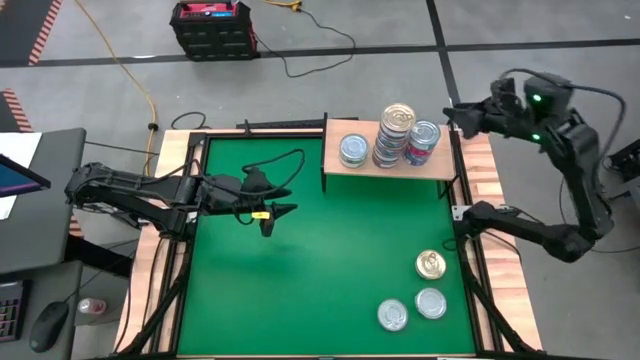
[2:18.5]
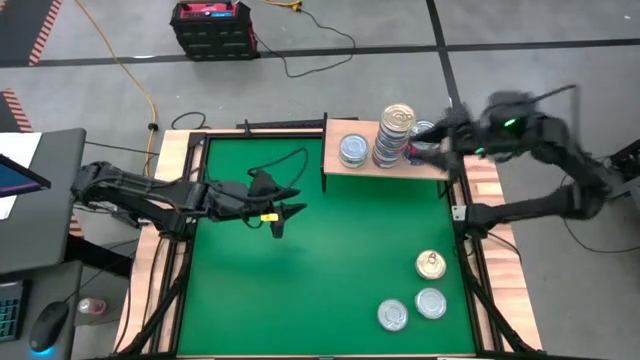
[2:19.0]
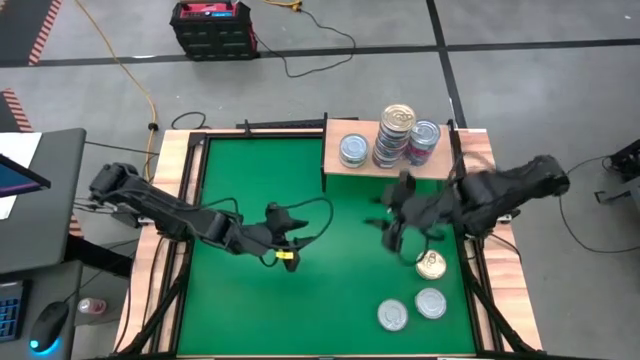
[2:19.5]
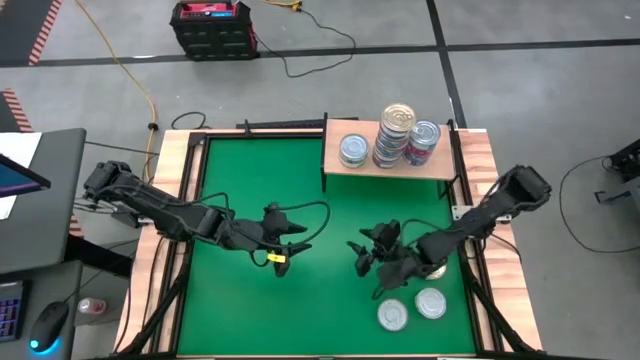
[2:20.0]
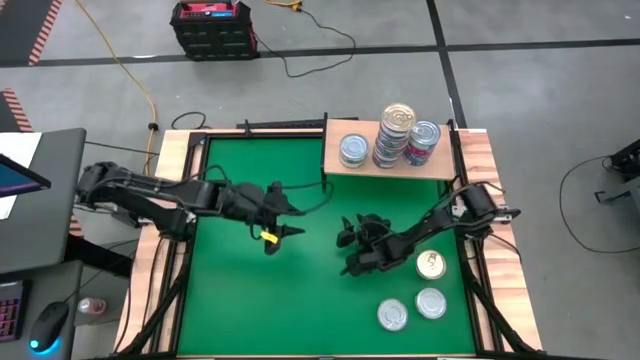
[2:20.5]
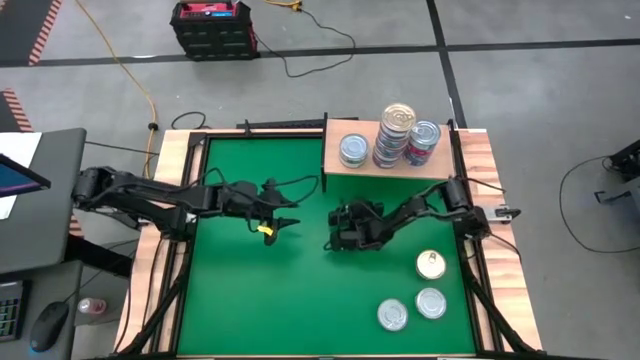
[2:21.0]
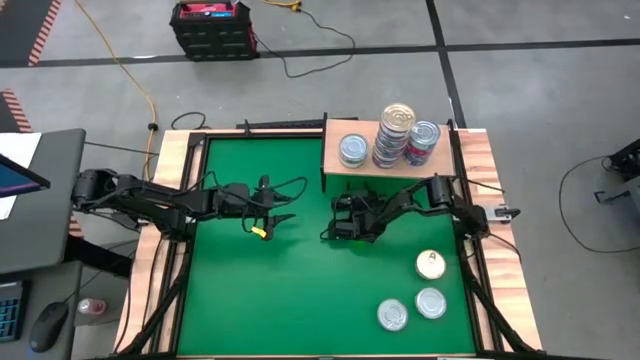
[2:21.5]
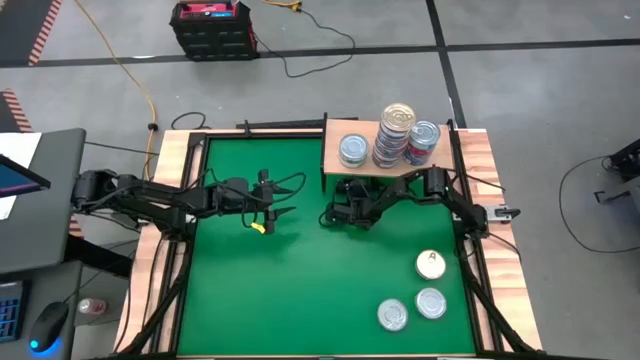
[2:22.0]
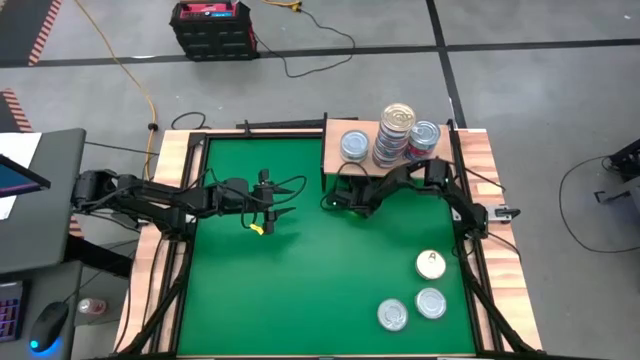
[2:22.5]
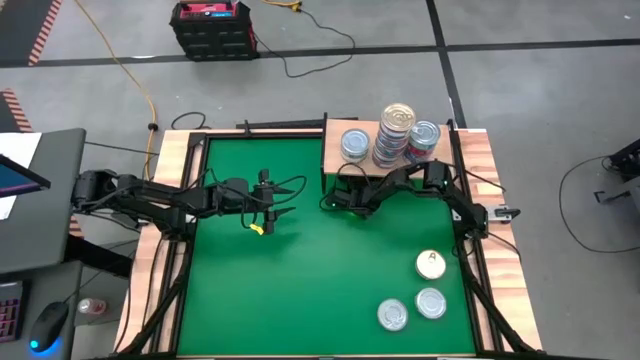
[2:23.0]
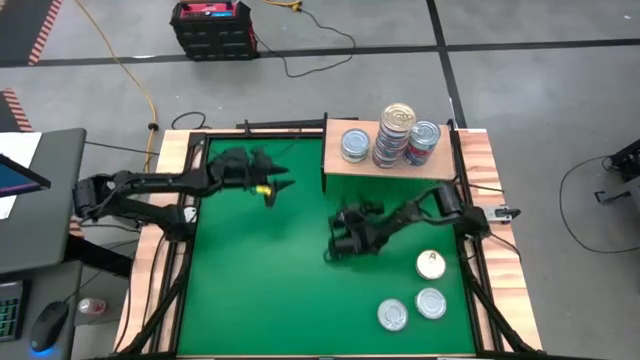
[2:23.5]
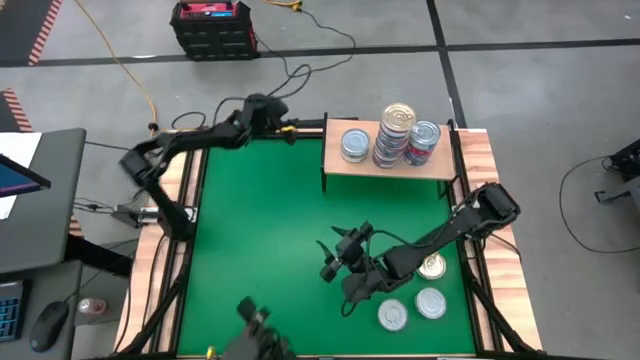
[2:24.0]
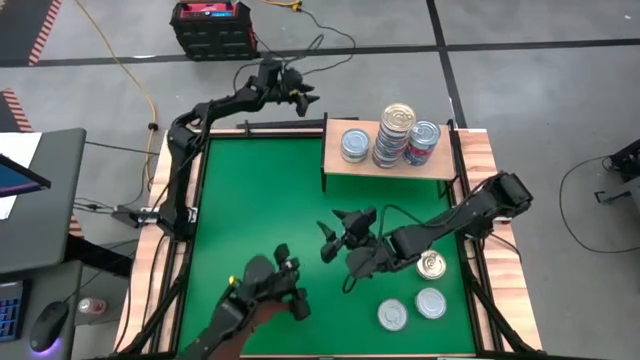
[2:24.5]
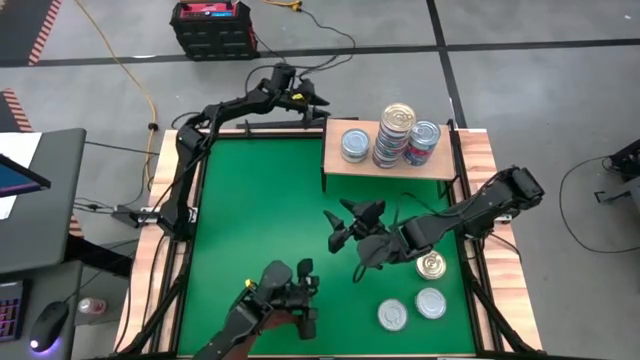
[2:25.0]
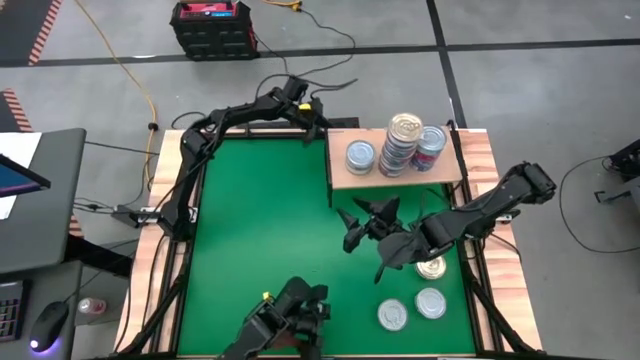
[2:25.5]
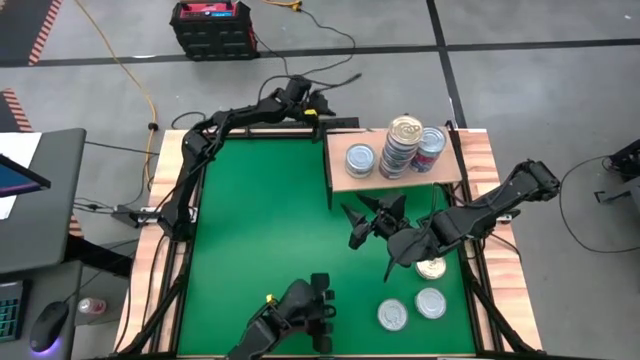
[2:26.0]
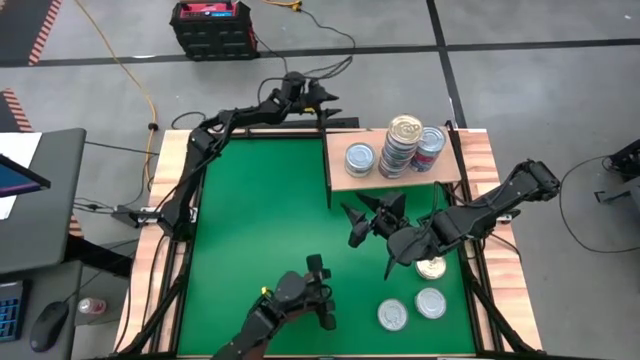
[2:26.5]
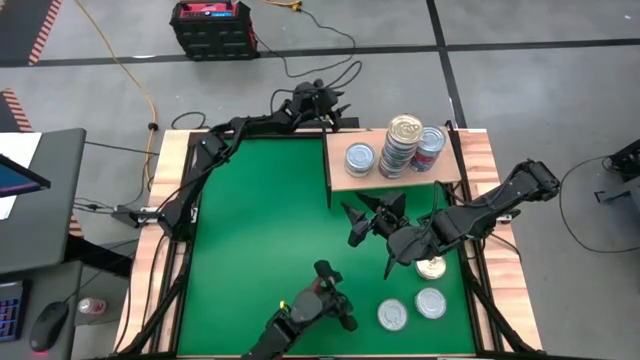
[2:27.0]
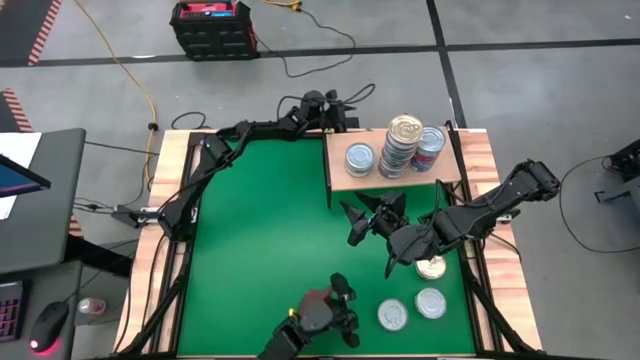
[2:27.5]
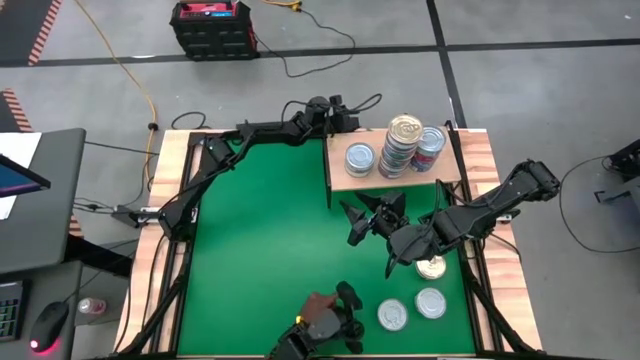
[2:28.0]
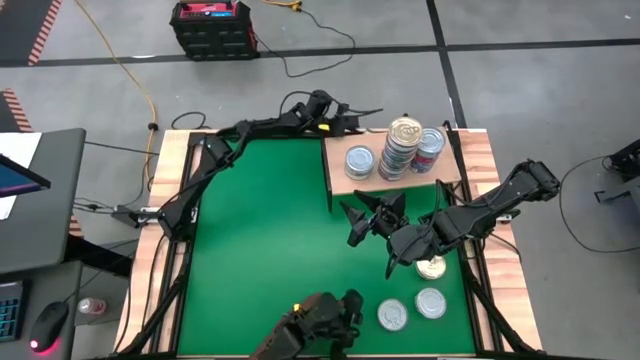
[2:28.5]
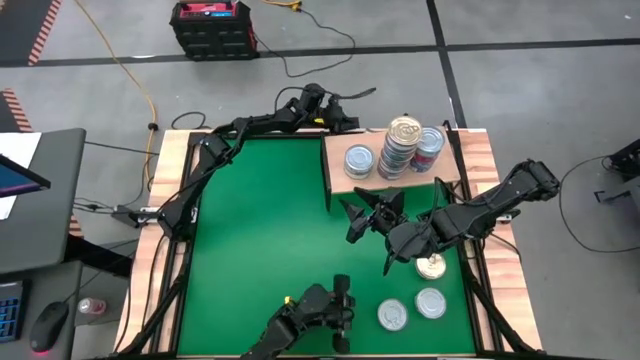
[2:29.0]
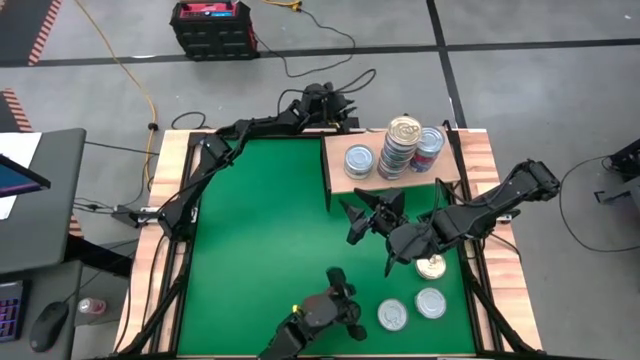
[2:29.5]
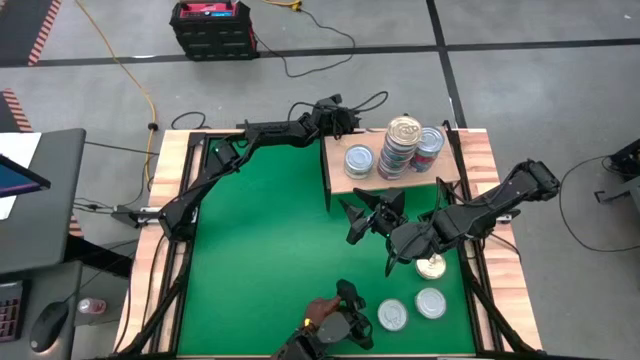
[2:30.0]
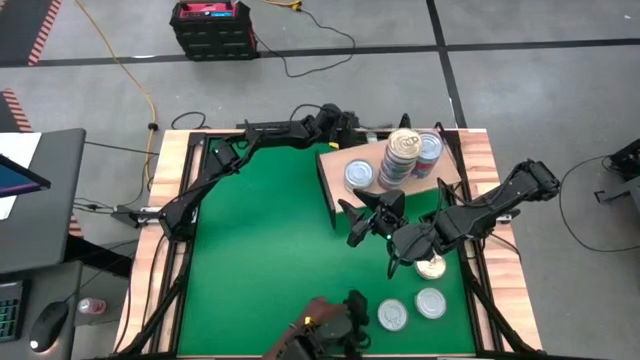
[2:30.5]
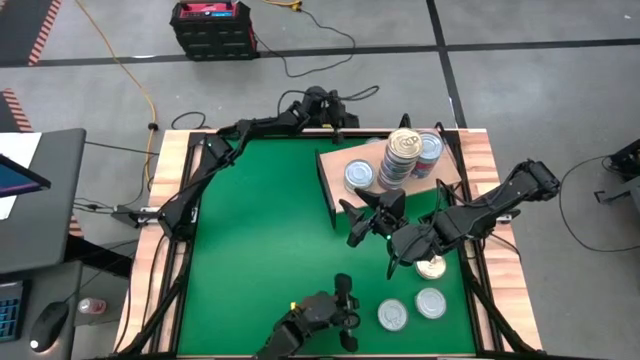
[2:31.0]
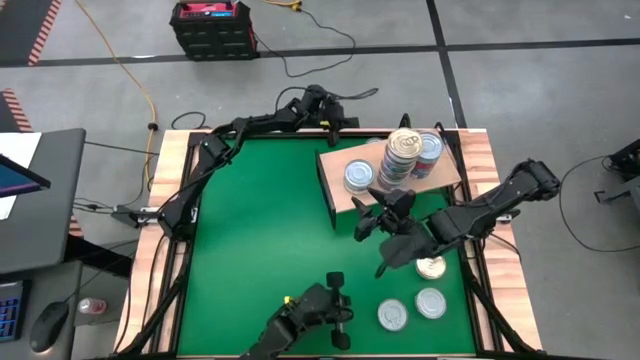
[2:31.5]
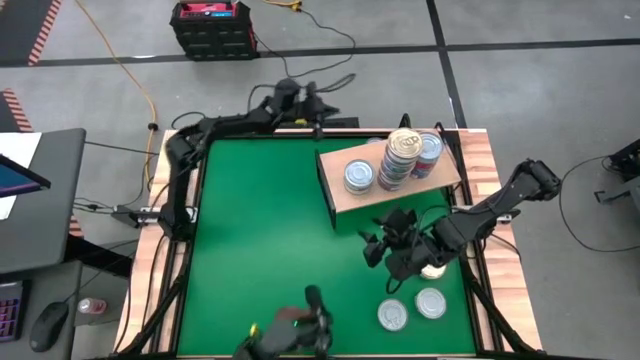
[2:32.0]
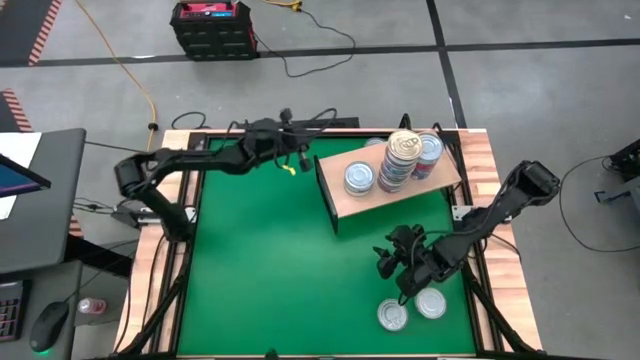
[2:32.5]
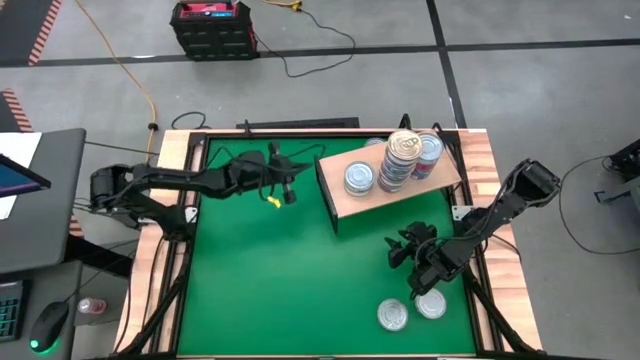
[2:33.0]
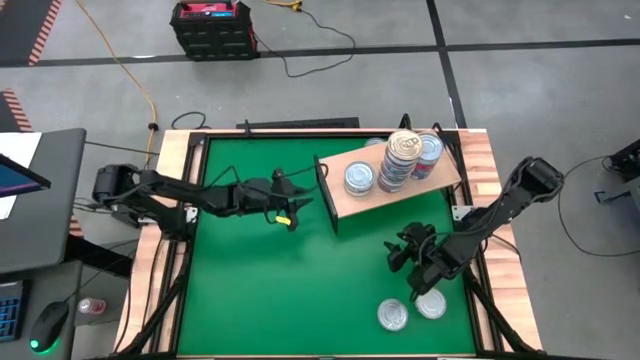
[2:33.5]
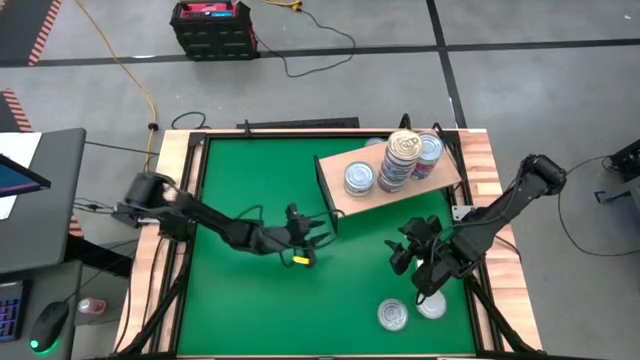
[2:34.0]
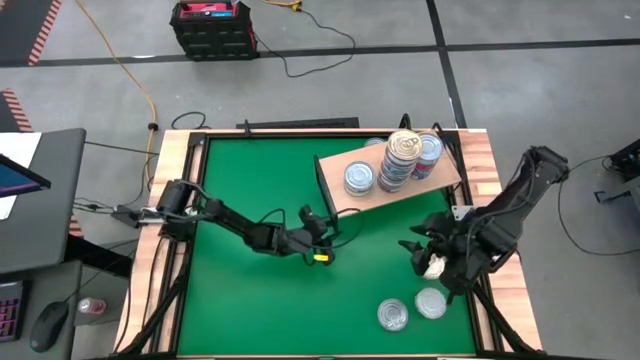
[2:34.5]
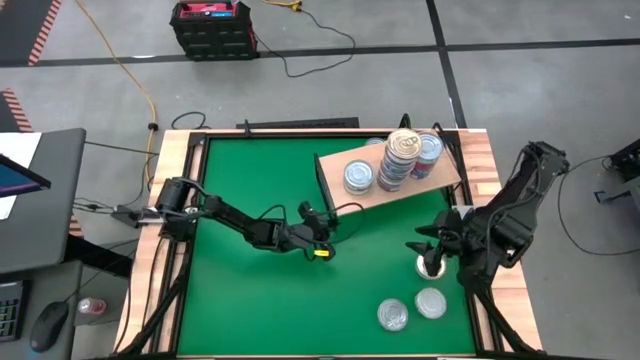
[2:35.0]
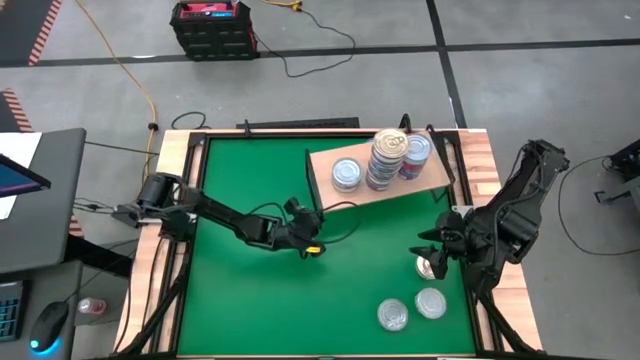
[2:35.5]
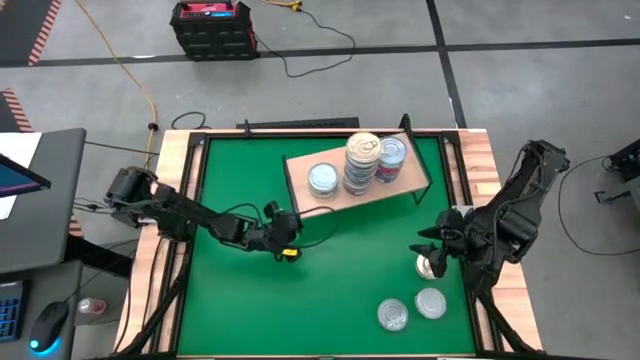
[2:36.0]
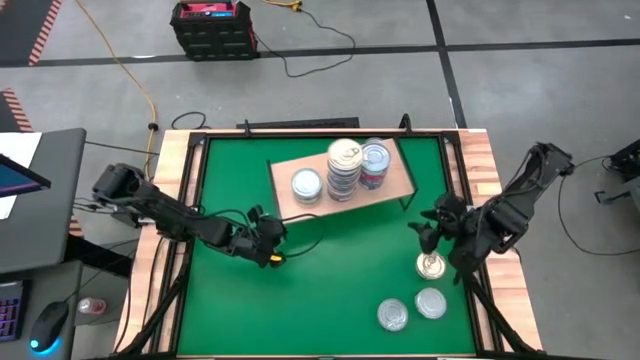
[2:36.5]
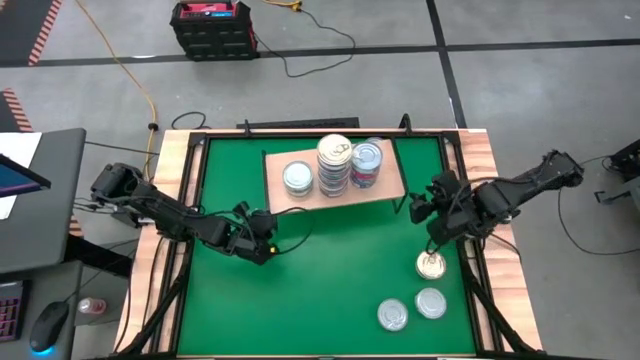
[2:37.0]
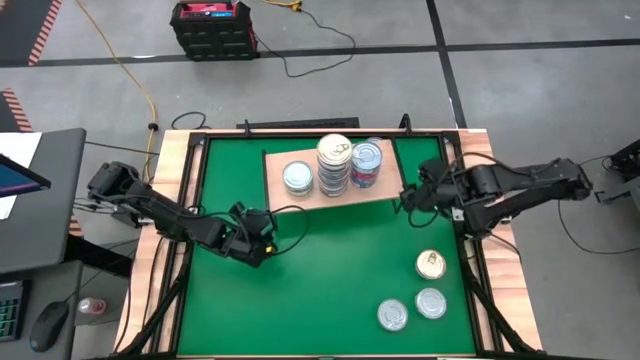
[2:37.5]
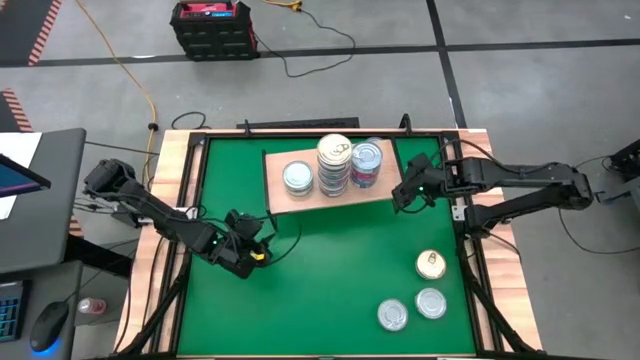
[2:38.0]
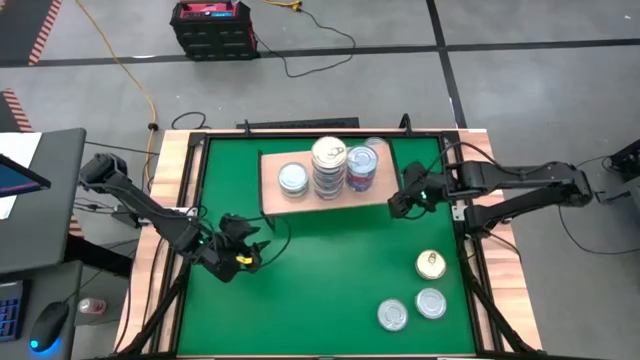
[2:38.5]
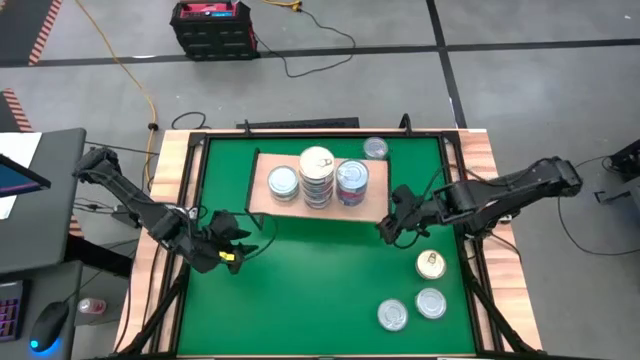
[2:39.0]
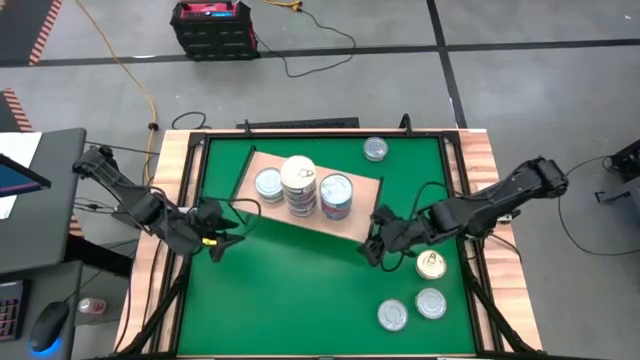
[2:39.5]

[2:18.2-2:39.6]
Task: Stack canned seafood by type on shelf
Move the shelf to the center of the table
